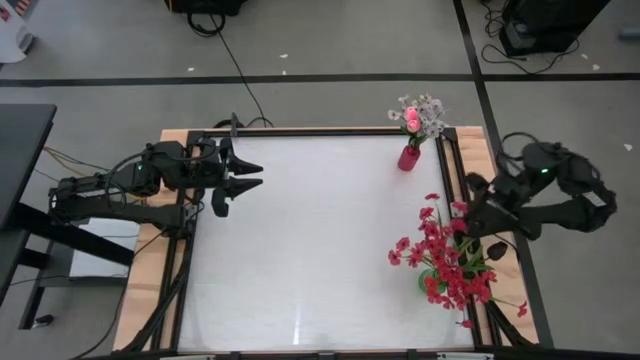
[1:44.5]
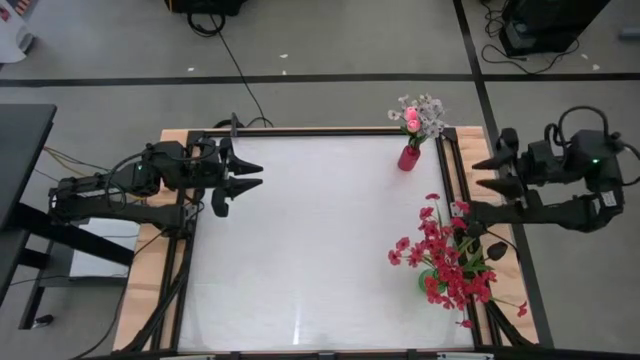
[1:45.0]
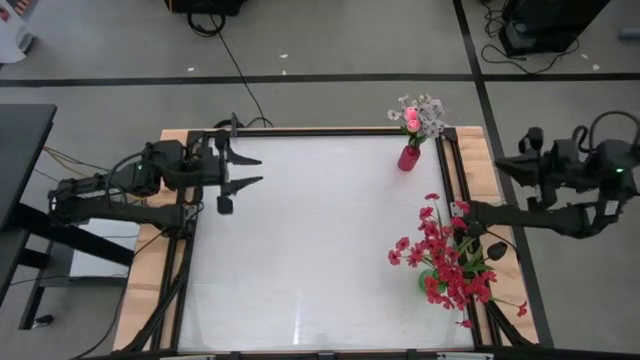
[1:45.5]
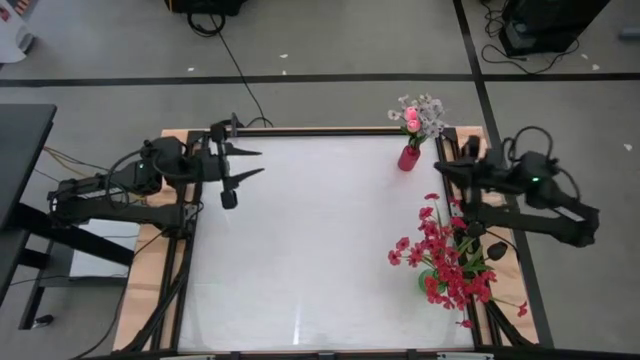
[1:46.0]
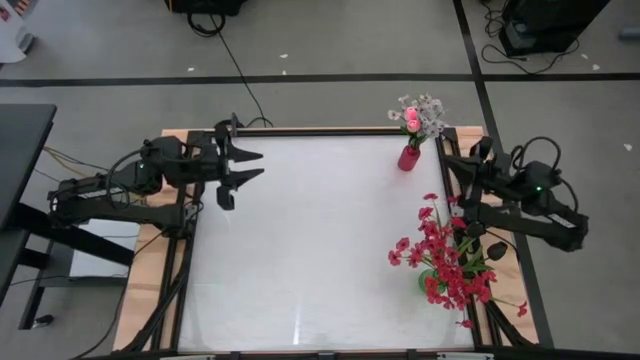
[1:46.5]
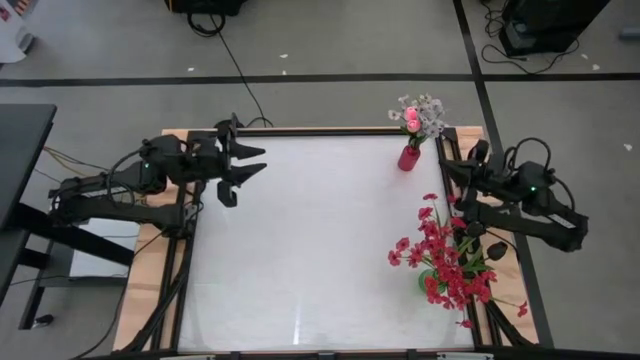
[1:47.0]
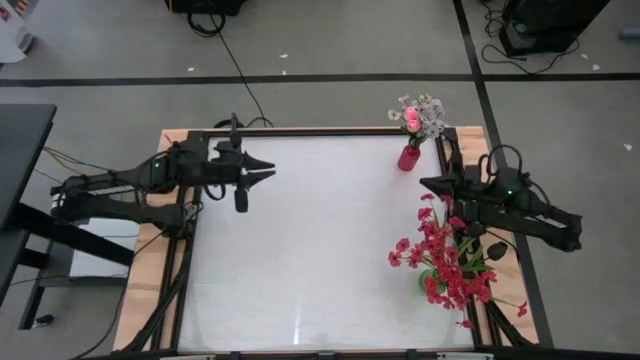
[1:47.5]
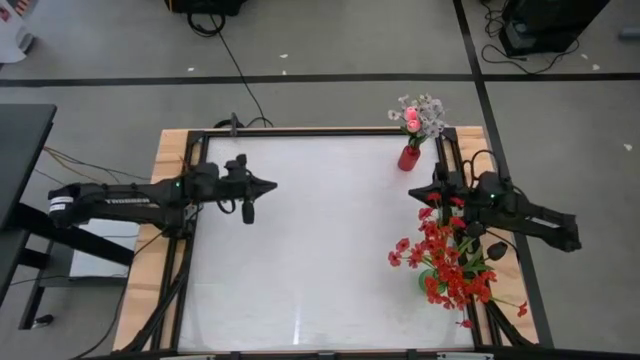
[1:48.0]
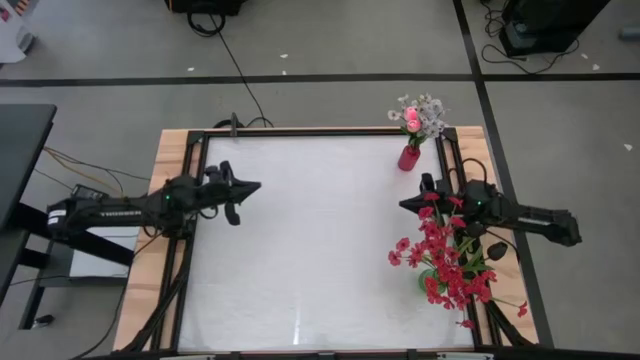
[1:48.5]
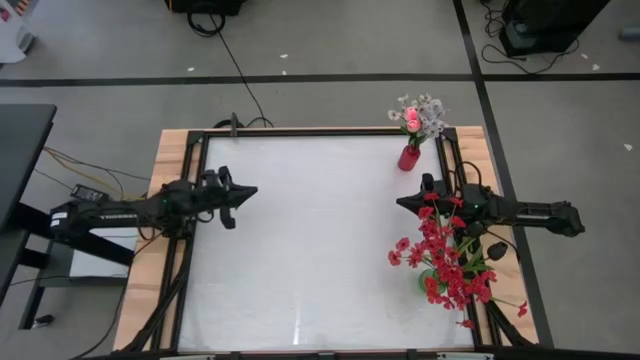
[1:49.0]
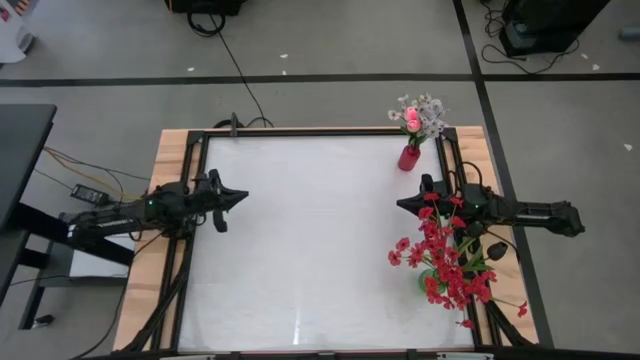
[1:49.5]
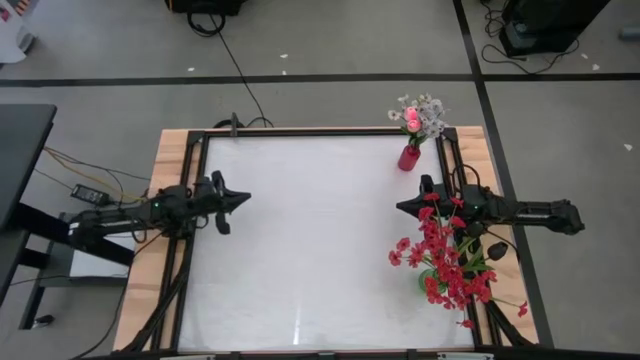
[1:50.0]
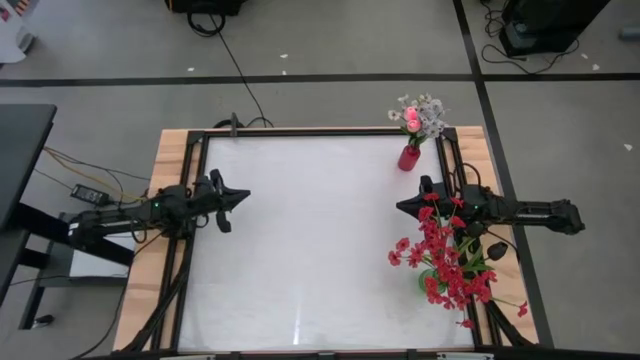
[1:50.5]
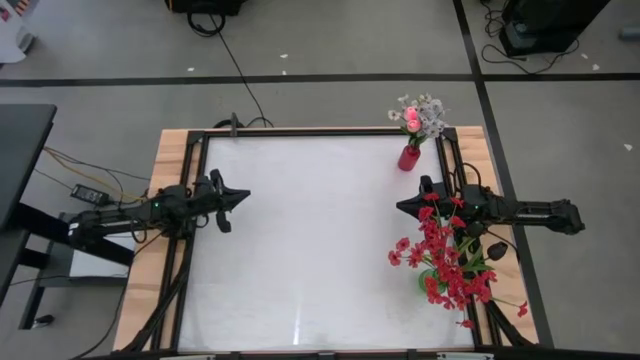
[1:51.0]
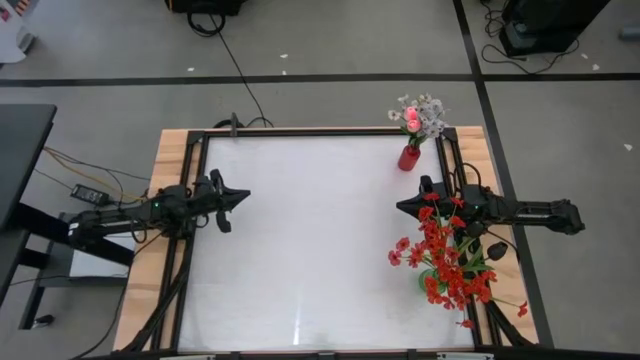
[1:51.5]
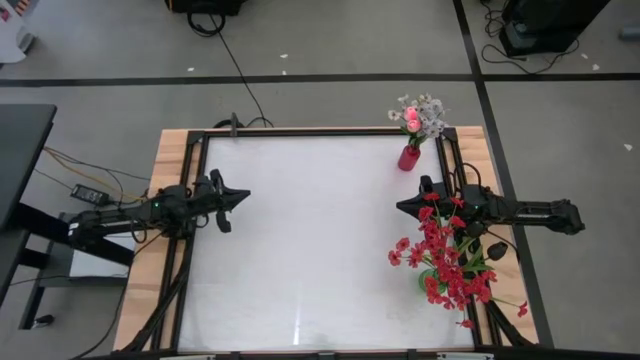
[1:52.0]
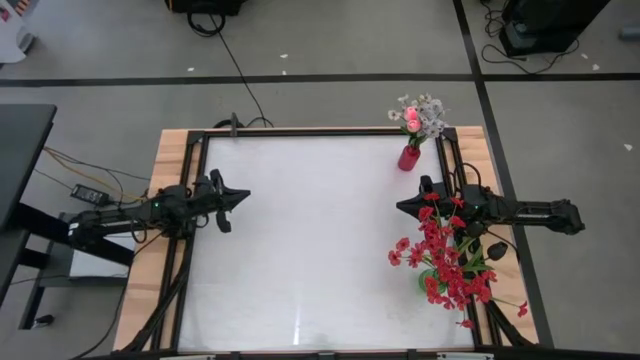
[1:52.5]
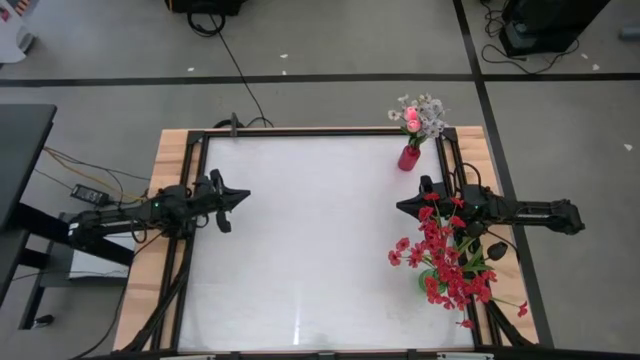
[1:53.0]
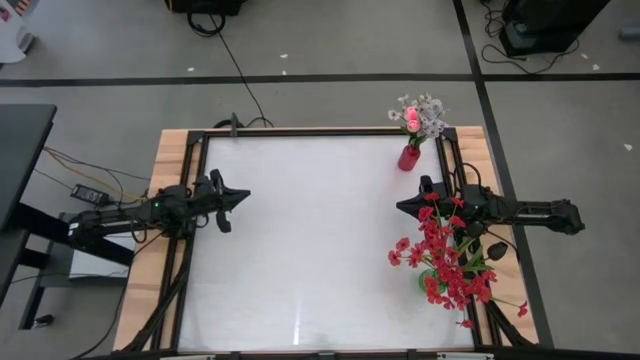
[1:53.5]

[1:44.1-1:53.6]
Task: Sort flowers into vase by color
Return to Home Position
